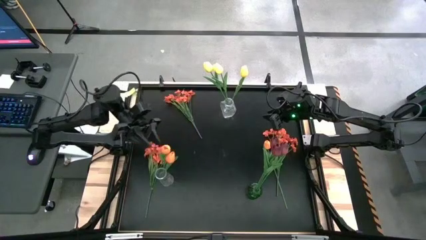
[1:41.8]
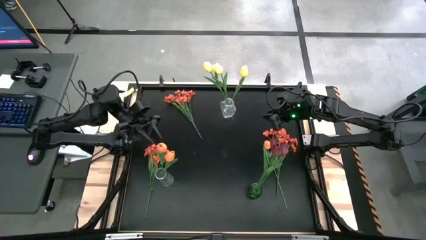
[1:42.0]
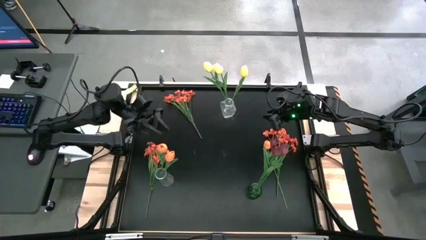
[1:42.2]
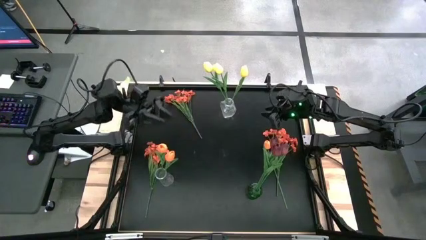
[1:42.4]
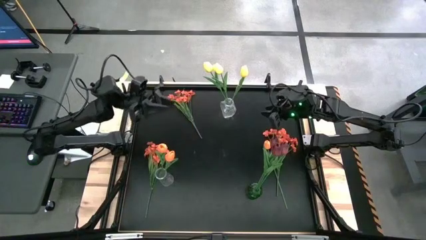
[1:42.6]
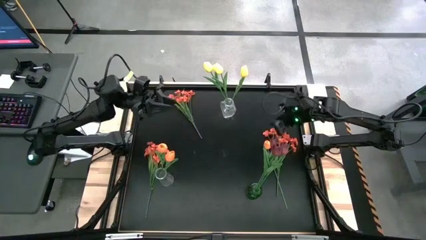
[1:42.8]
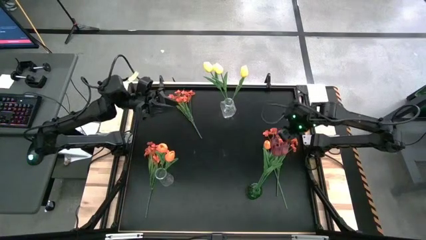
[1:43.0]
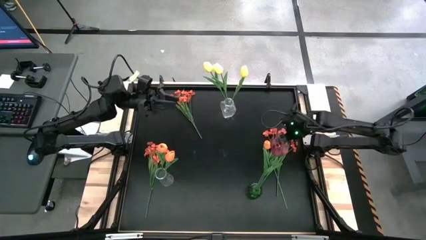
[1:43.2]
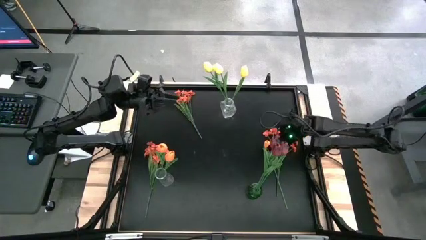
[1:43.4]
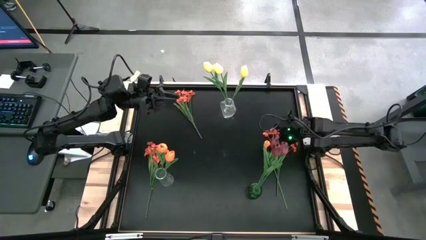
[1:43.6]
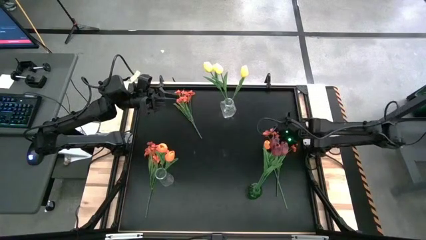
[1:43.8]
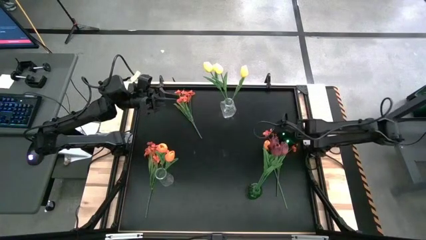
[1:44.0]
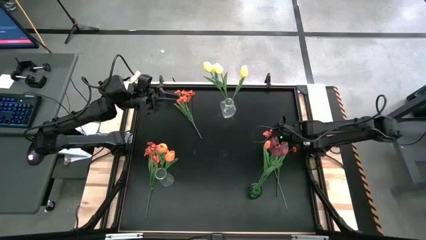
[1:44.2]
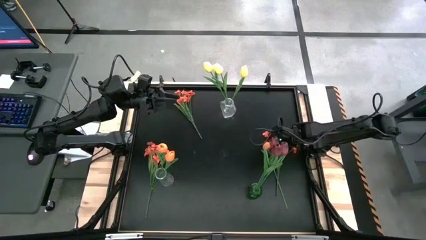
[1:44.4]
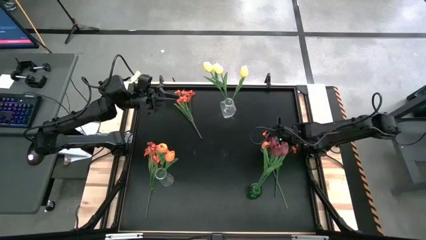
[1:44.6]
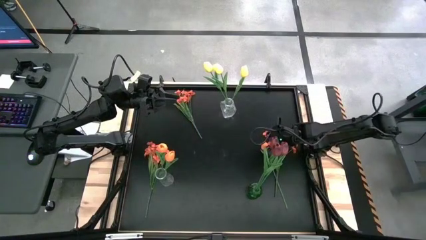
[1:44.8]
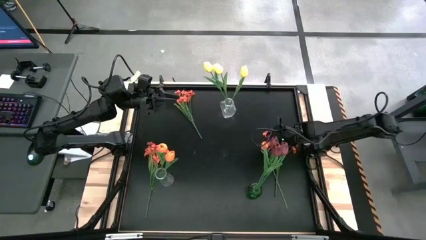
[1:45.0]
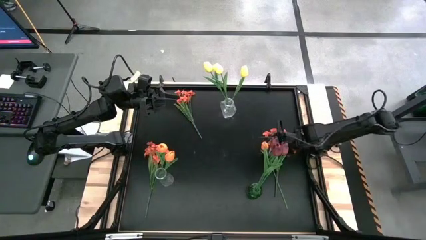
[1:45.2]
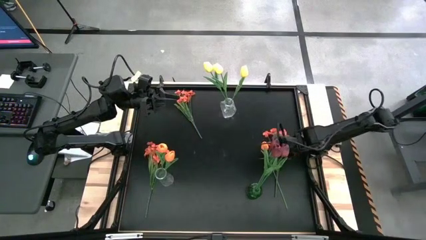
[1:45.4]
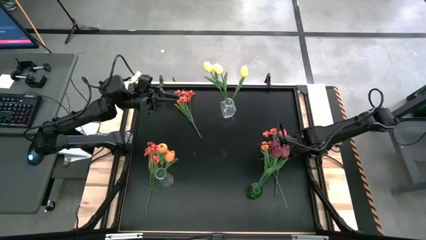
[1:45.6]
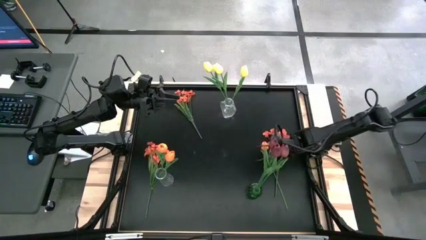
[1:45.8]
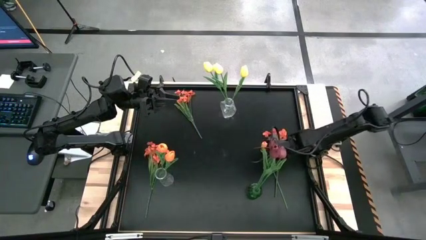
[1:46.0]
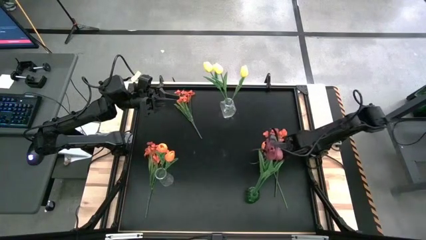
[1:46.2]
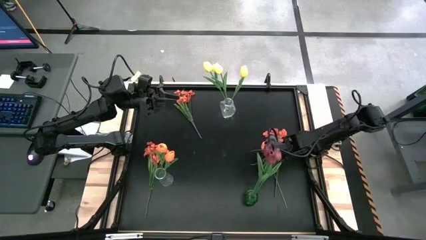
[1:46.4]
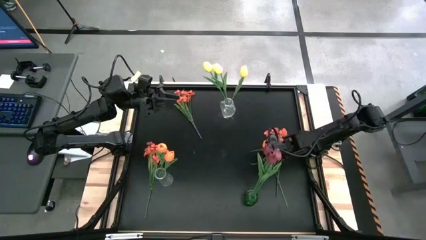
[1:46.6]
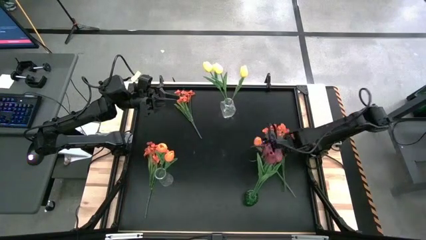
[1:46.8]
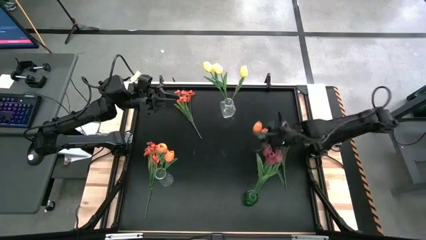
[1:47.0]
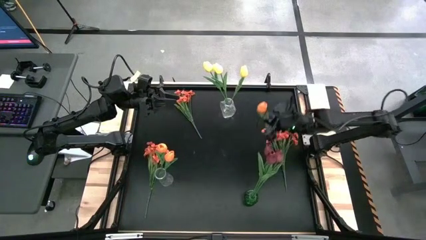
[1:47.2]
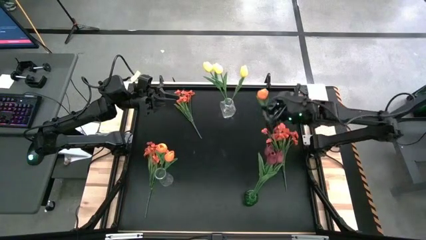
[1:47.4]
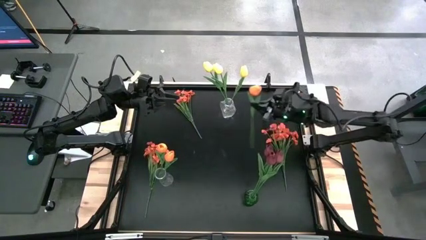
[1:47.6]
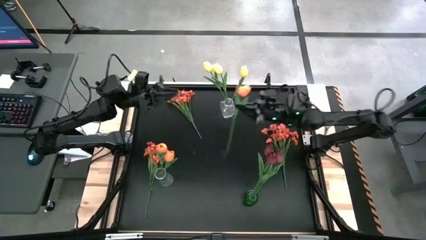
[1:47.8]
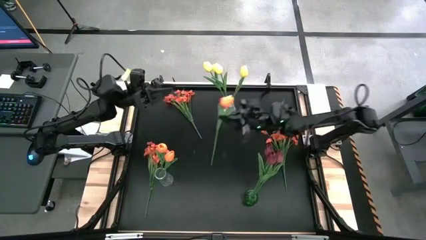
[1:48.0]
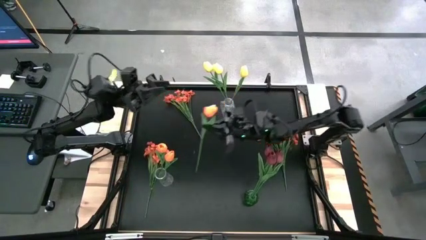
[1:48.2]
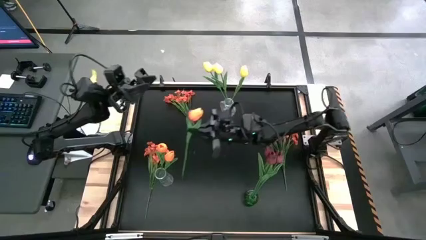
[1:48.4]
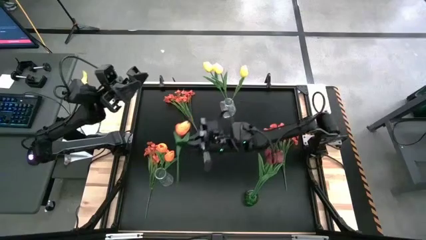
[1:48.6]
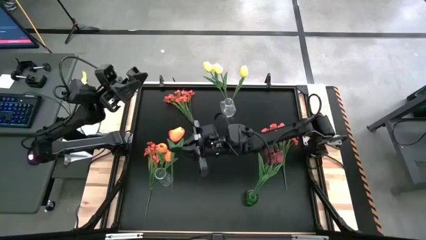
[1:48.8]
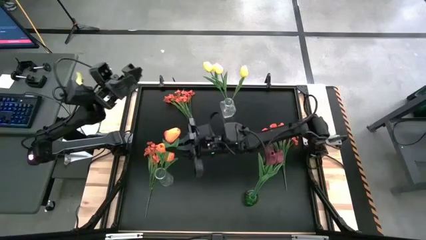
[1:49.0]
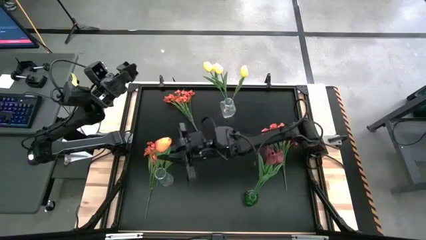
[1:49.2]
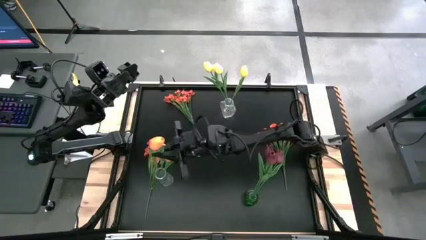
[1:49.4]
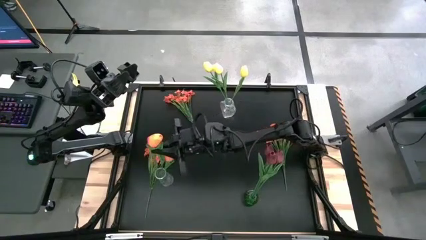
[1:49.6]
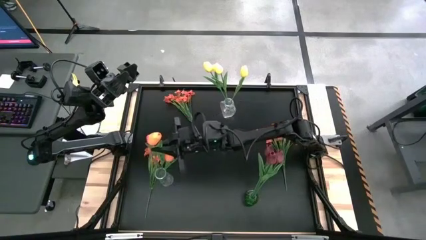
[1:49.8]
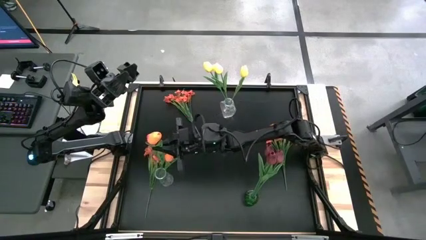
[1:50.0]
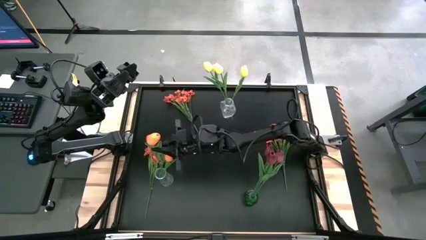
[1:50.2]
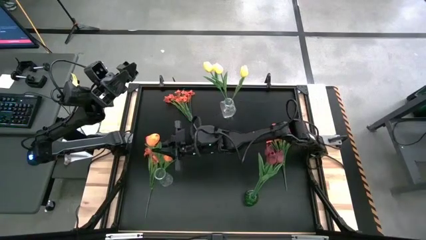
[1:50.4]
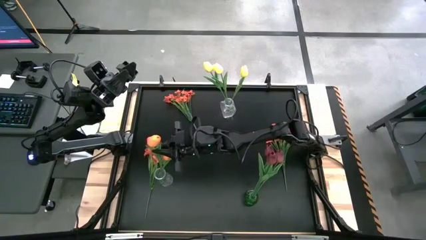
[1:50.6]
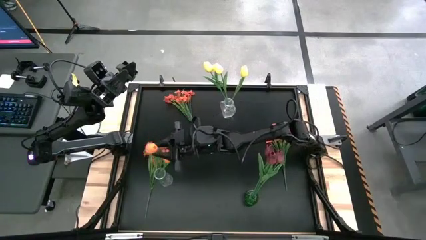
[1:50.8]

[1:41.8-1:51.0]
Task: Sort flowers into vase by color
Put the orange tulip into the bottom transparent vase

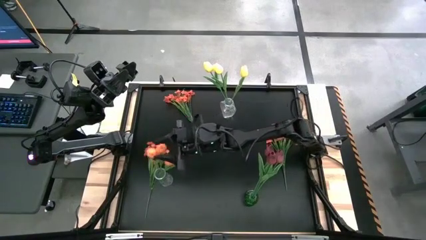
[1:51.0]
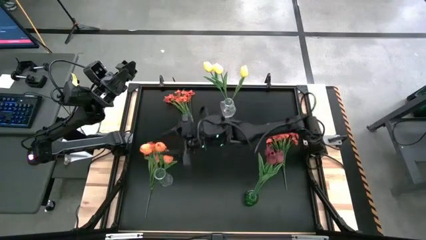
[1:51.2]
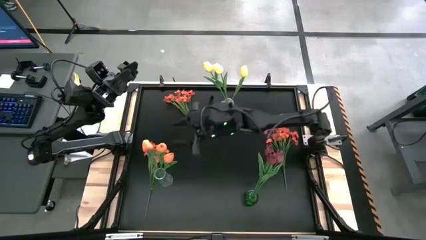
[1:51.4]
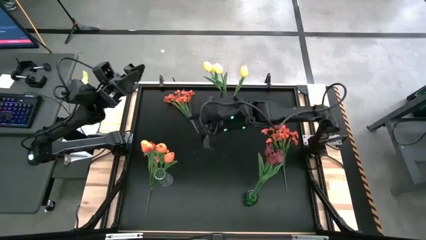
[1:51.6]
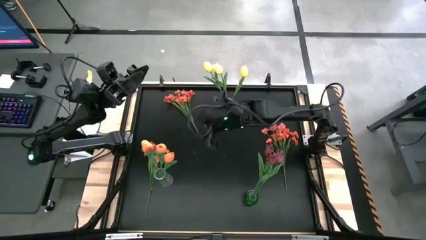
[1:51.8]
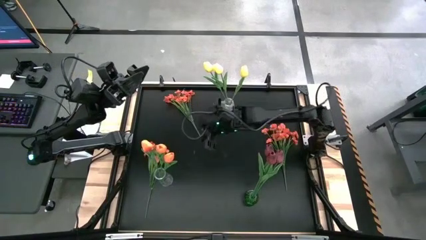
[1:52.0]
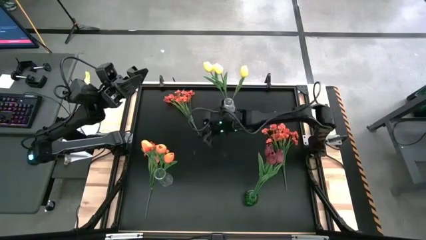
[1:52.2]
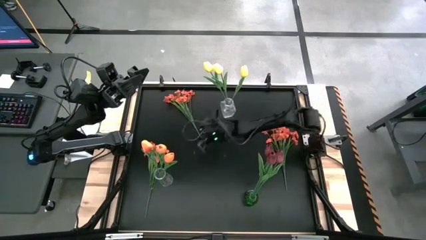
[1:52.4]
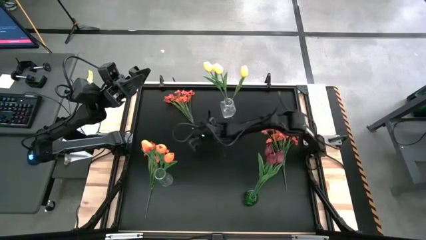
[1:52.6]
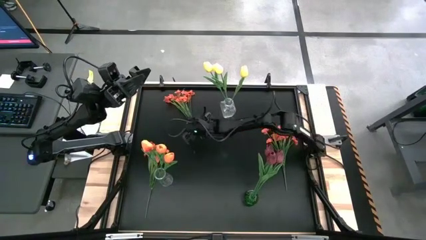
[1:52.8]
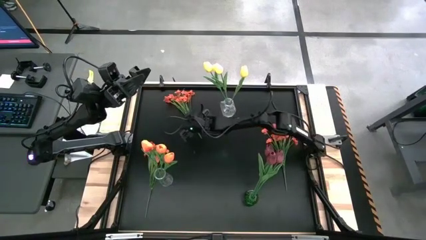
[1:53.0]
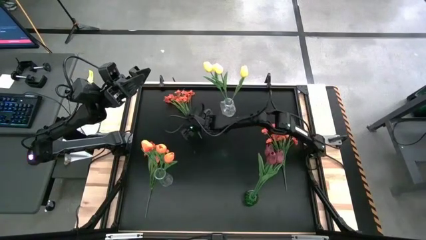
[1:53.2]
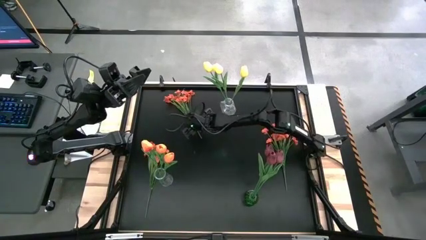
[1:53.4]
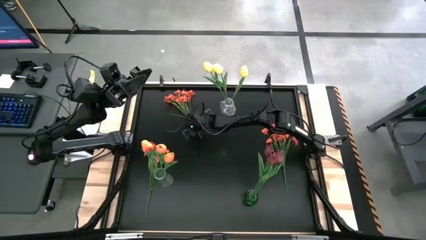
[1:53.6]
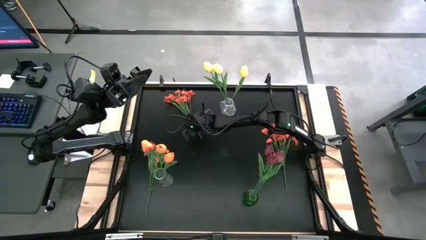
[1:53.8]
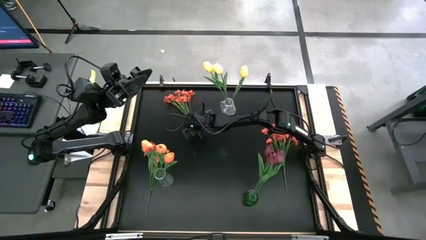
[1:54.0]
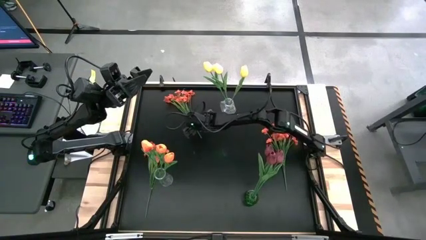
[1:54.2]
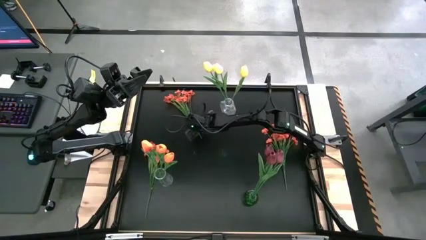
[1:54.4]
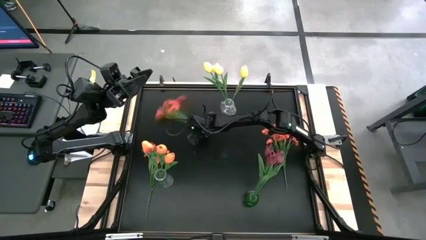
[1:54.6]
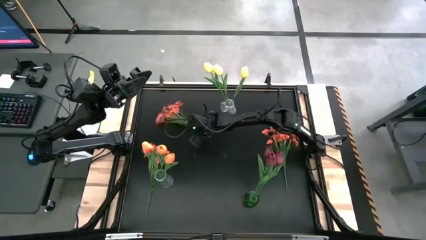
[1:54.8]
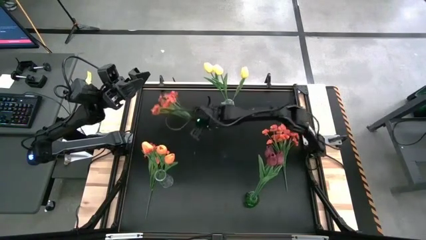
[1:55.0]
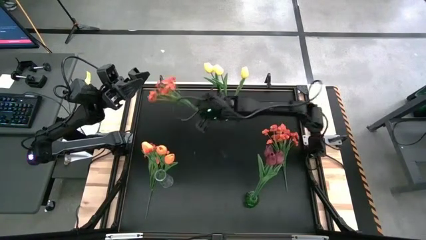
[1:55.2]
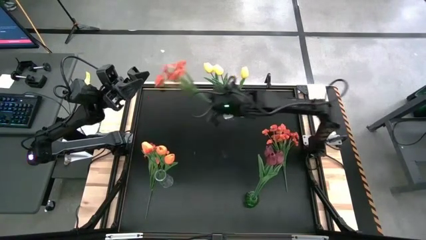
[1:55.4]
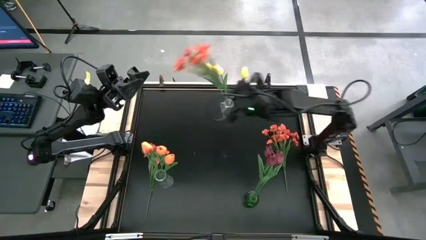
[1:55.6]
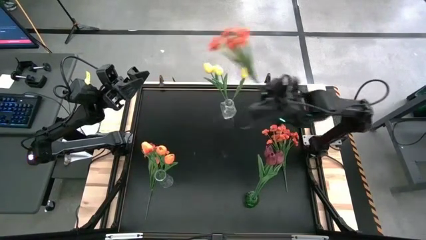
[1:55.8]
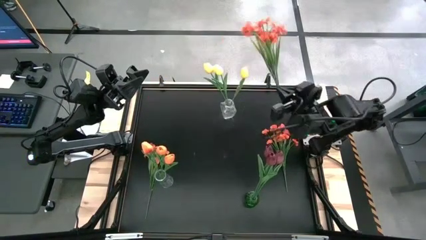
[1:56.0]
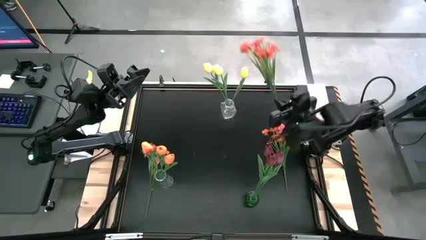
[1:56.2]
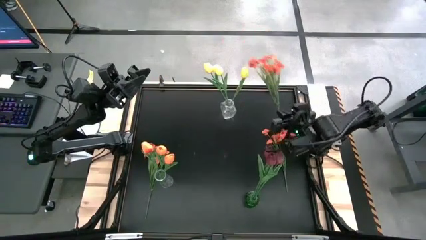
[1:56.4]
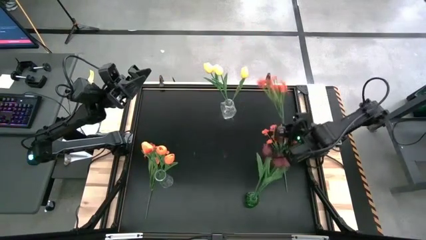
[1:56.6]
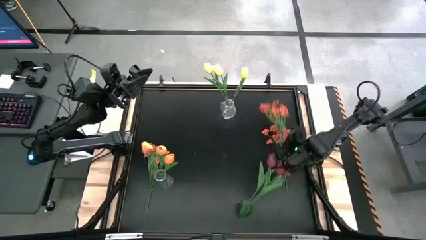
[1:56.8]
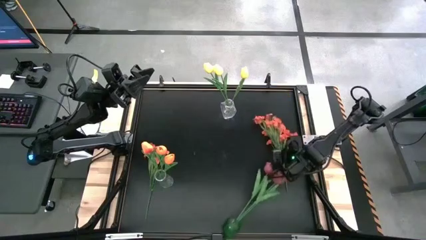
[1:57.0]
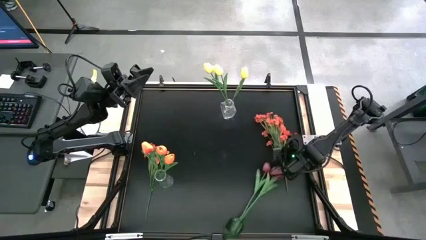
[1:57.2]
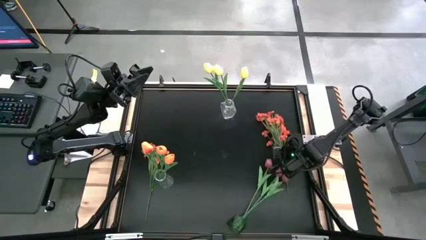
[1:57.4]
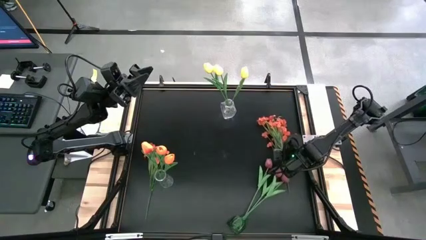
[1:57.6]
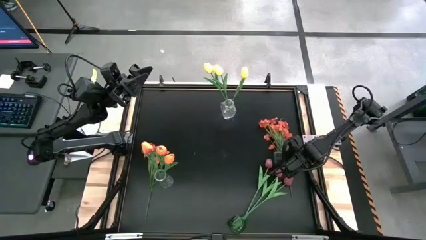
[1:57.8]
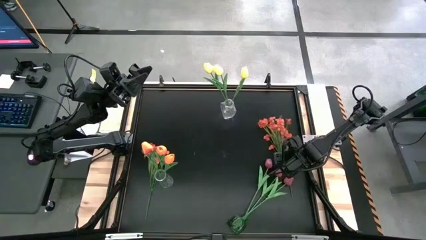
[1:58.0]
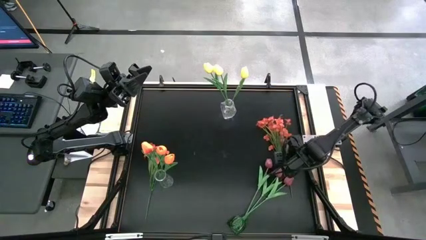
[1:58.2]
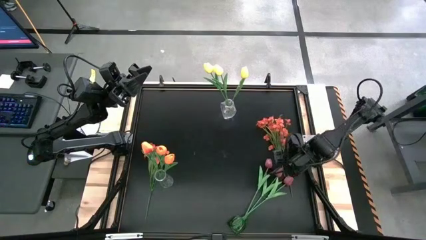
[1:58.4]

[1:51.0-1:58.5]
Move the top orange flowers to the middle right of the table
